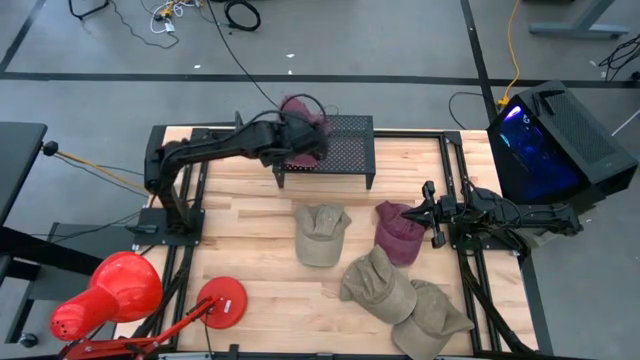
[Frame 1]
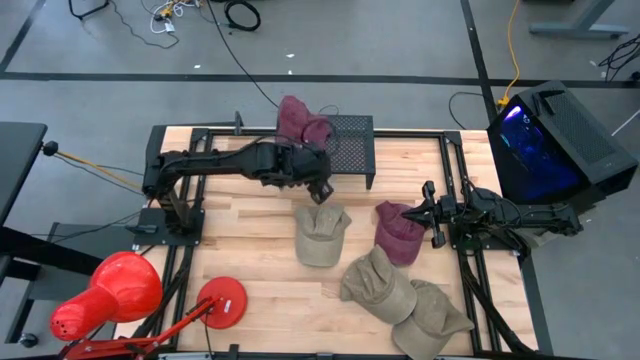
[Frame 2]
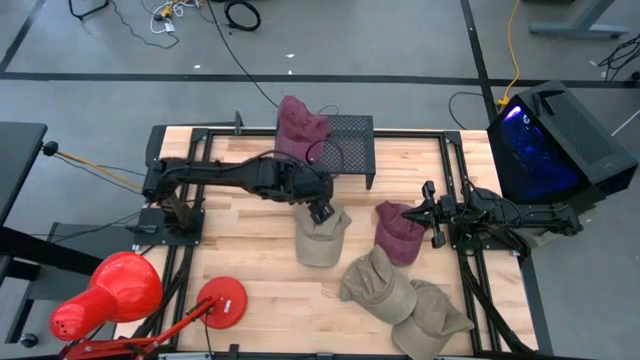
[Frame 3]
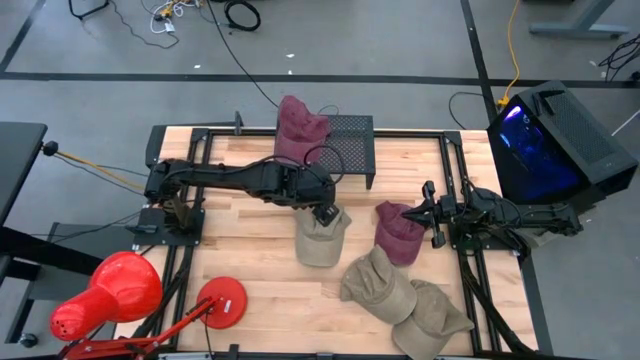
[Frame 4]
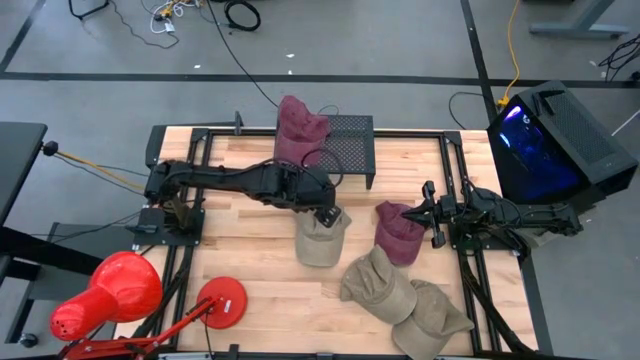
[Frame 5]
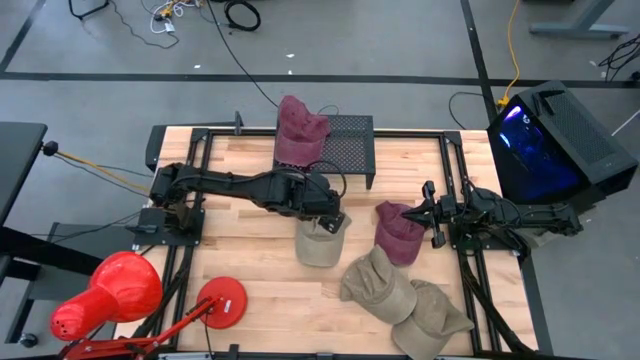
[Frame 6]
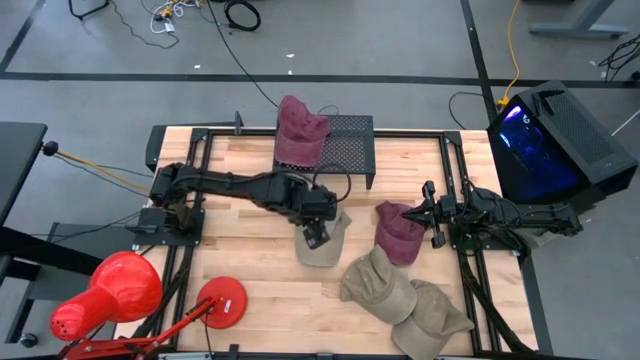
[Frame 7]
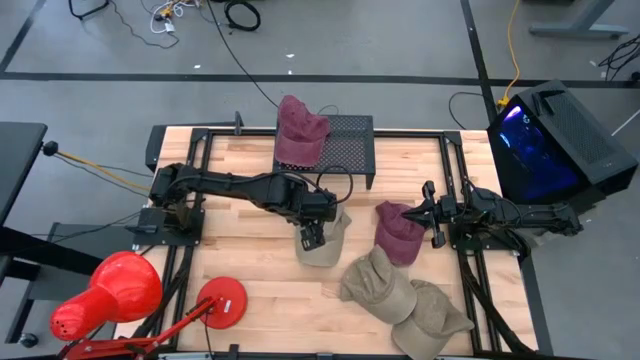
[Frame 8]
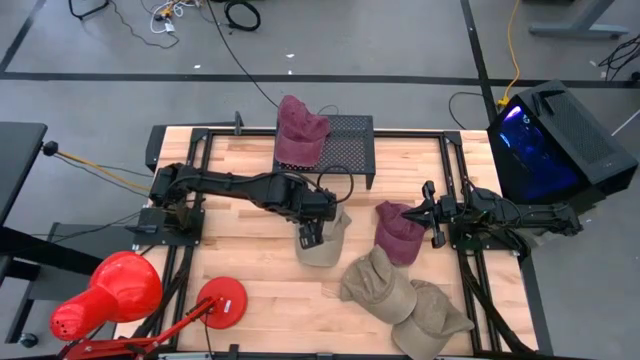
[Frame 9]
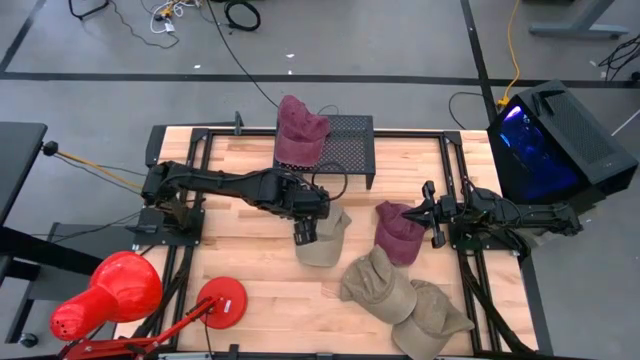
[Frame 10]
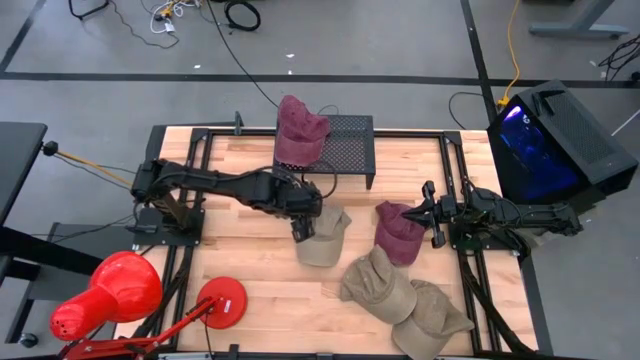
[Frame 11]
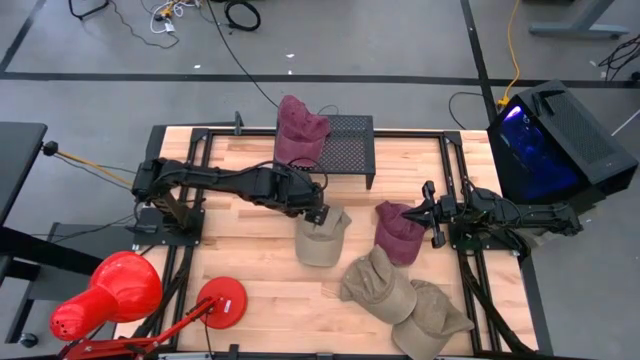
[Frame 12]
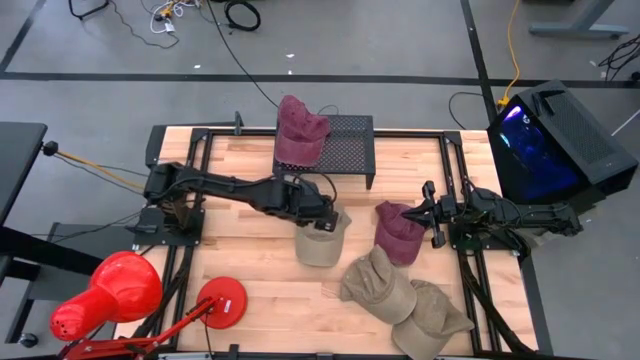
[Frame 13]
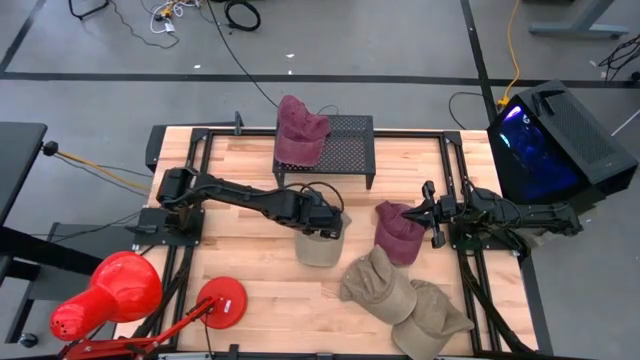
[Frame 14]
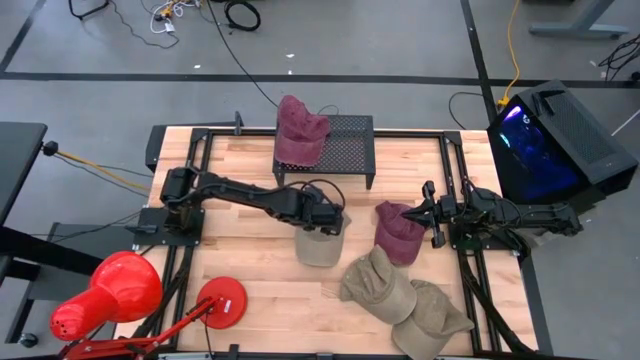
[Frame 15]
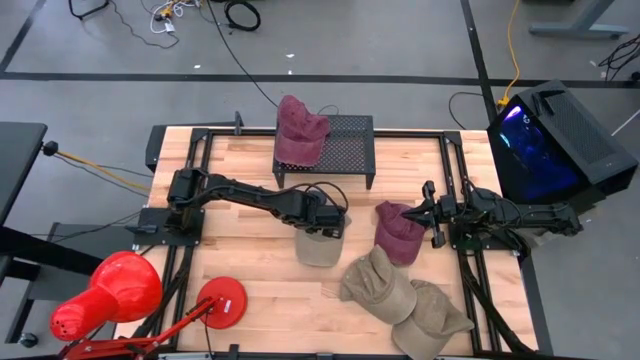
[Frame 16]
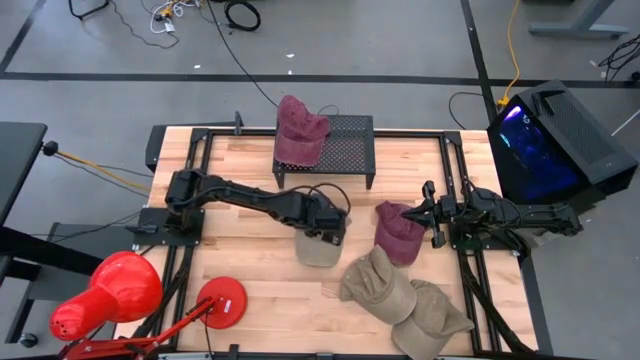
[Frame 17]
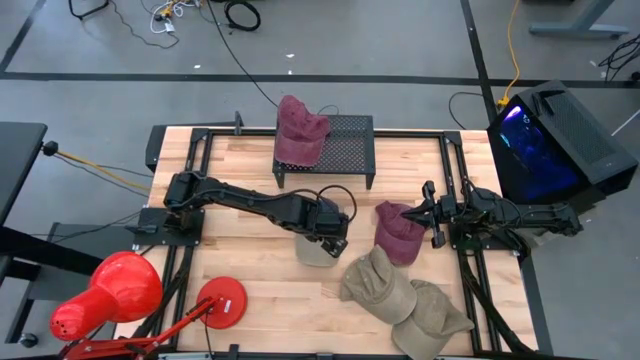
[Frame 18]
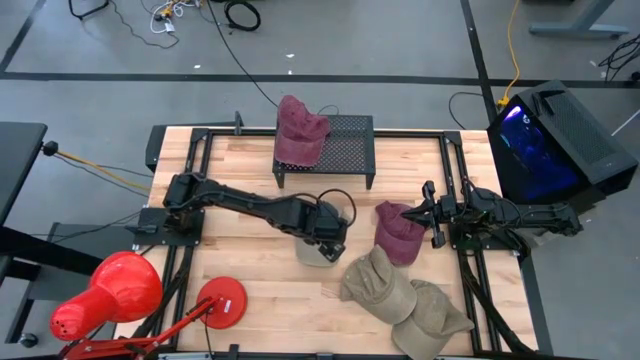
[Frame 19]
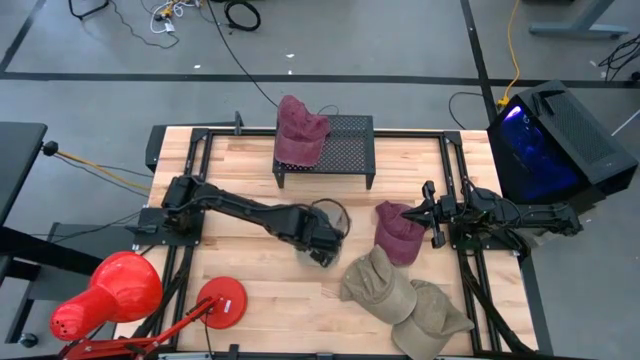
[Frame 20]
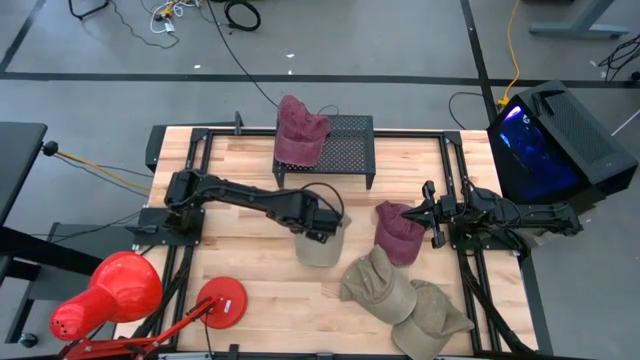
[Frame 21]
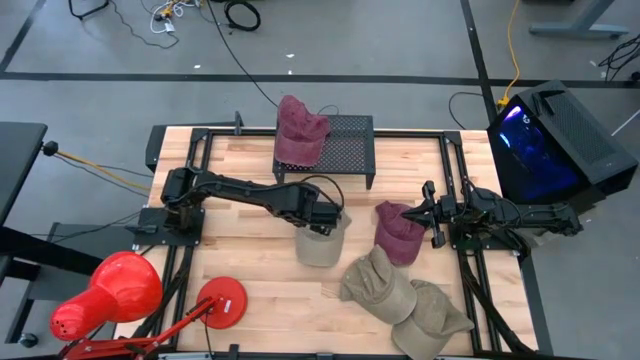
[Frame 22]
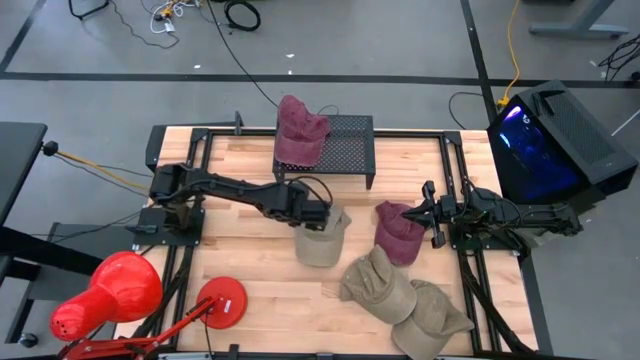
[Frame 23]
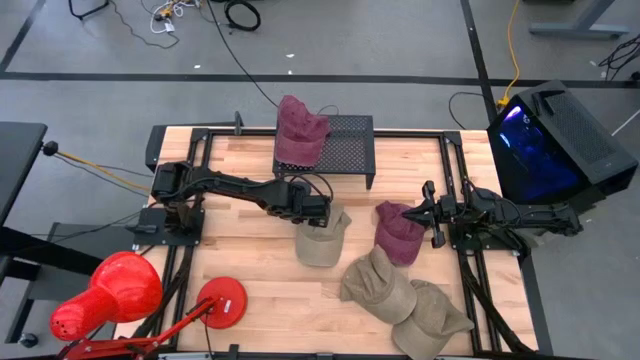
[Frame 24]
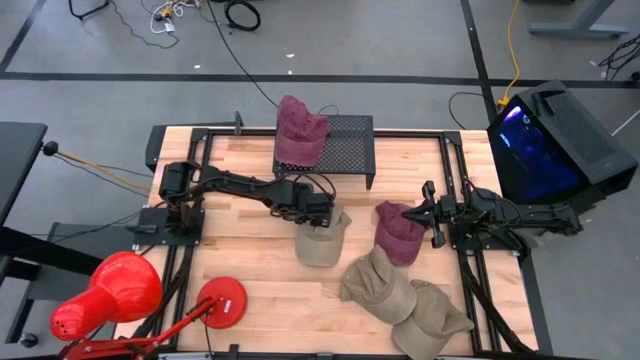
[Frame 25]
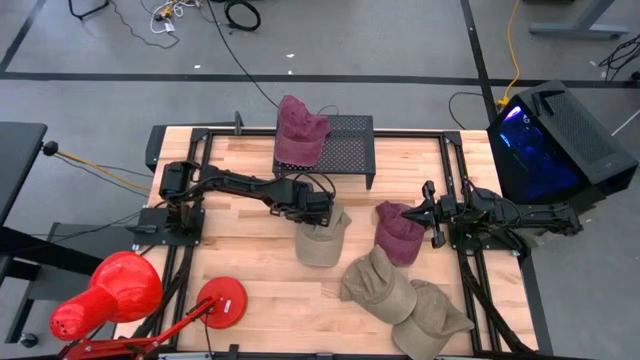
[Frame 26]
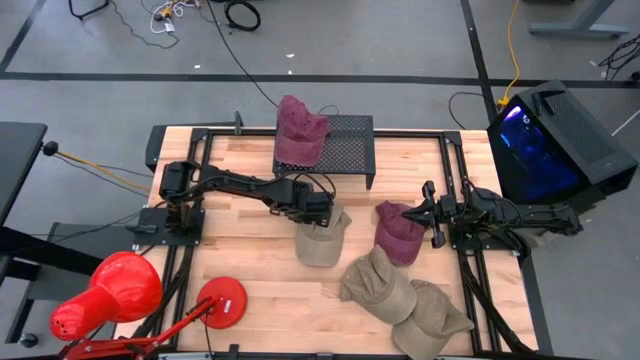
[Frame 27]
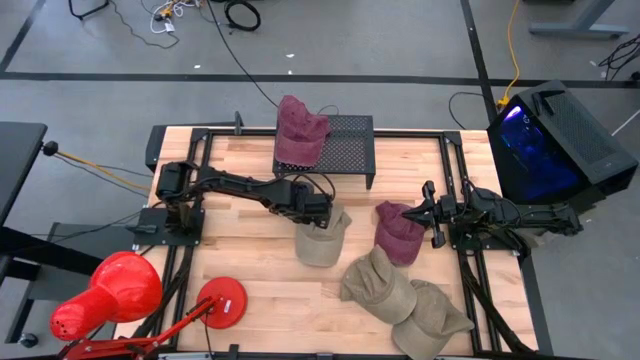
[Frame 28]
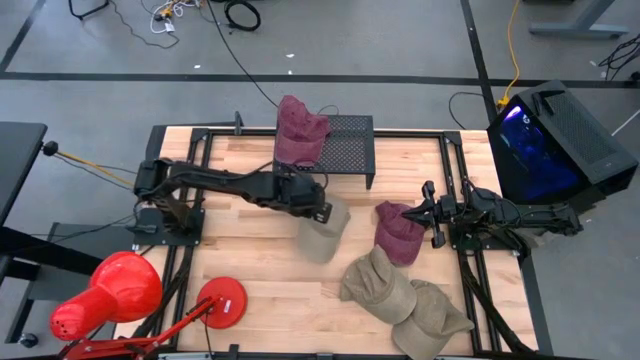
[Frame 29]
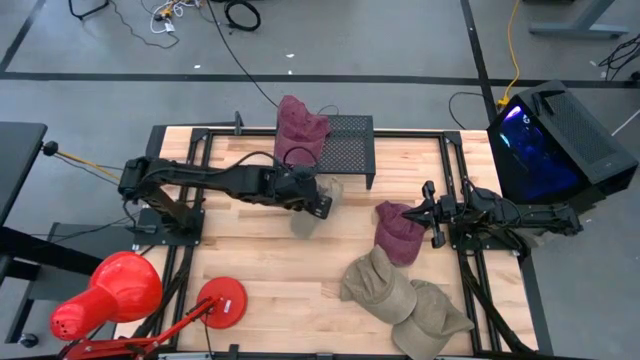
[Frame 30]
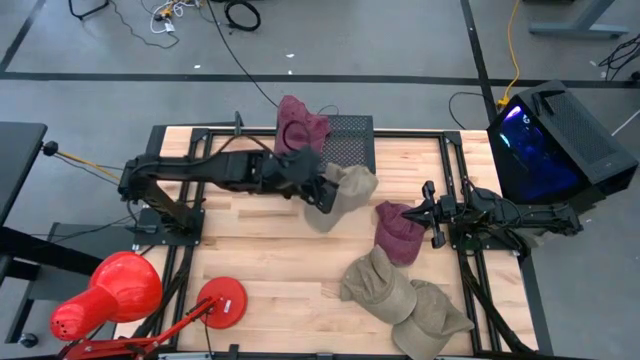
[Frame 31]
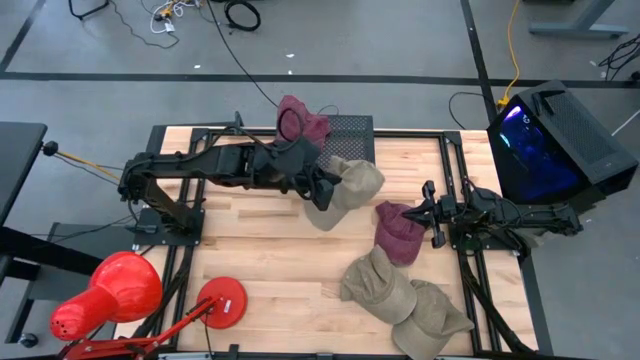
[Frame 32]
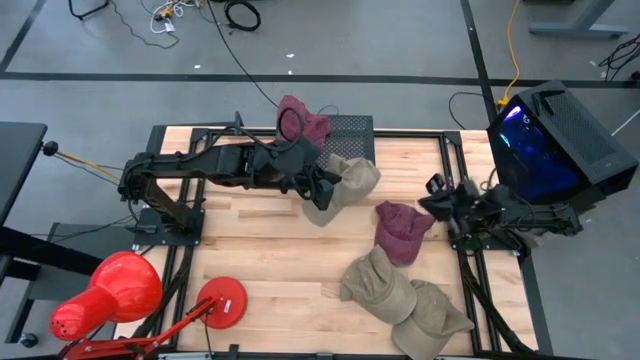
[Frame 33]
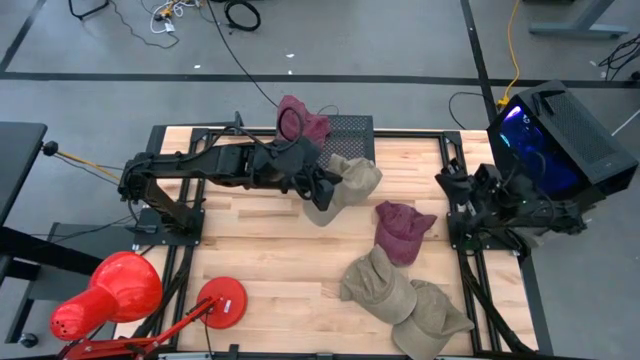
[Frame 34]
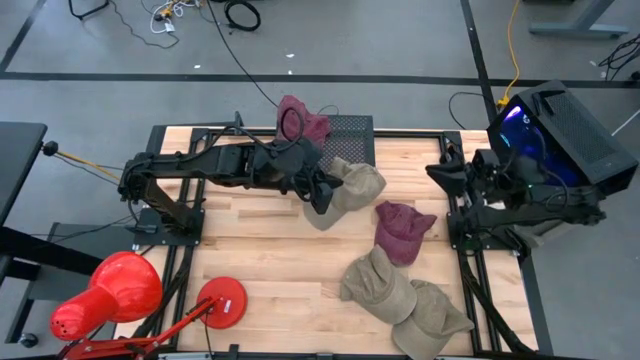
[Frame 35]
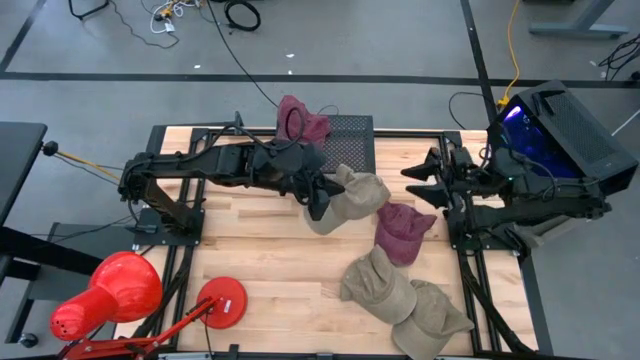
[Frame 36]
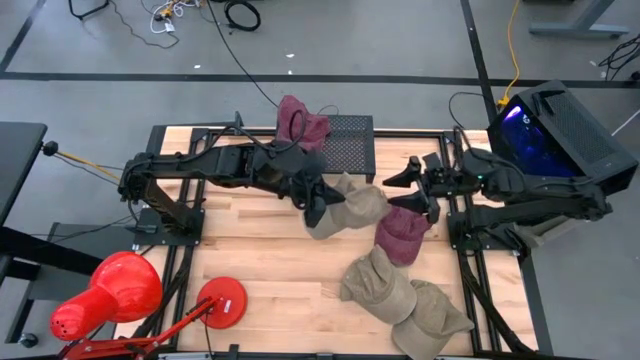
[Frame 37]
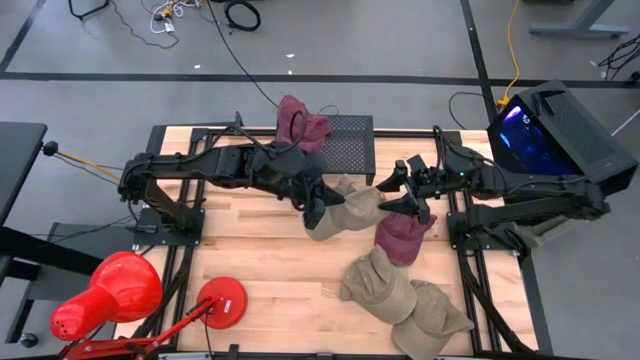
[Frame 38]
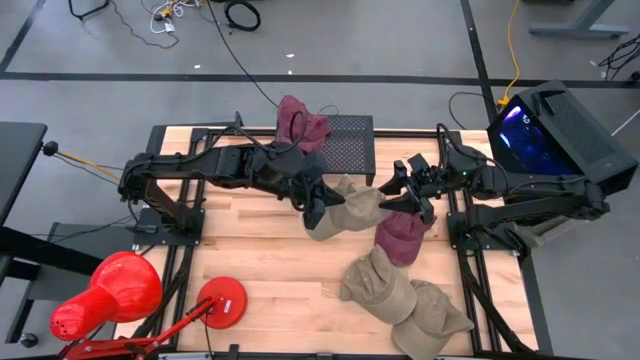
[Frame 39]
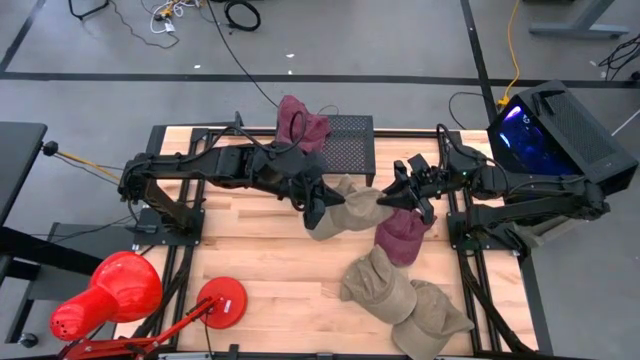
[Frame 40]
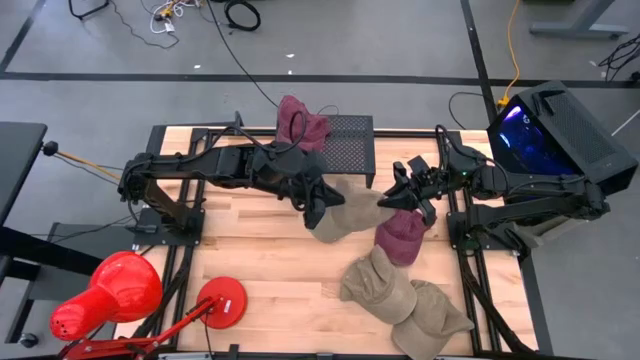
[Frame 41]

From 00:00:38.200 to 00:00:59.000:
Task: Pick & Place hat
Put the top brown cap on the shelf
